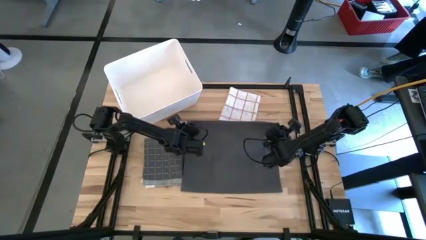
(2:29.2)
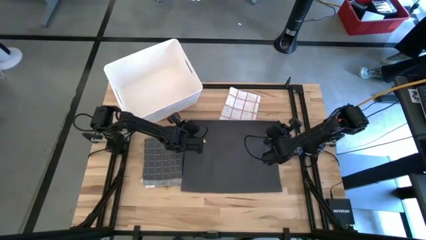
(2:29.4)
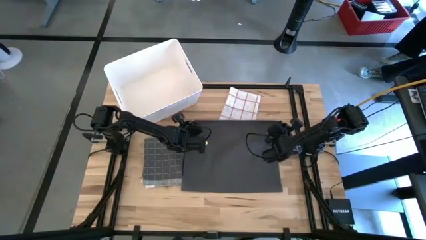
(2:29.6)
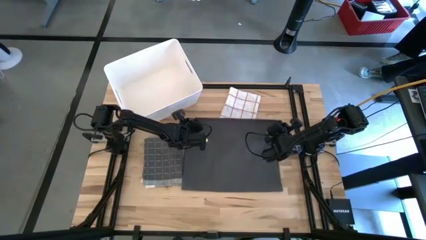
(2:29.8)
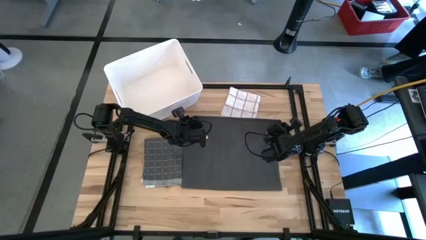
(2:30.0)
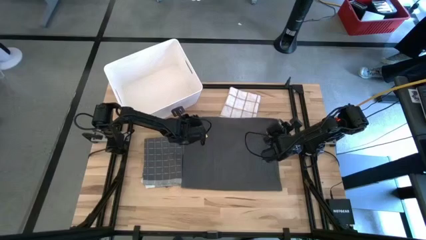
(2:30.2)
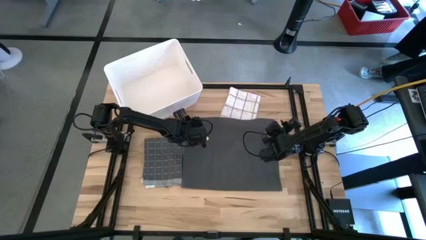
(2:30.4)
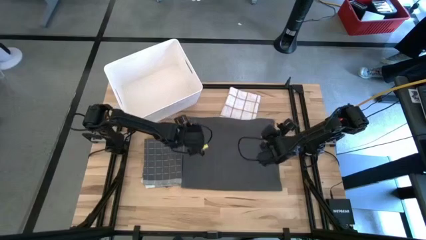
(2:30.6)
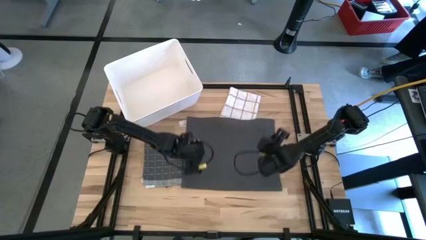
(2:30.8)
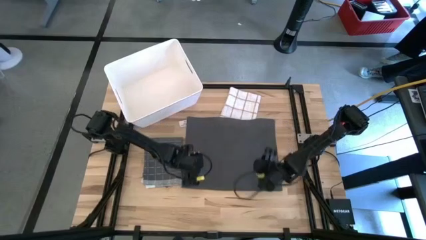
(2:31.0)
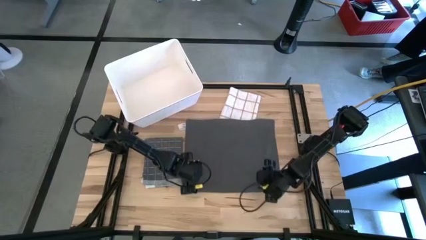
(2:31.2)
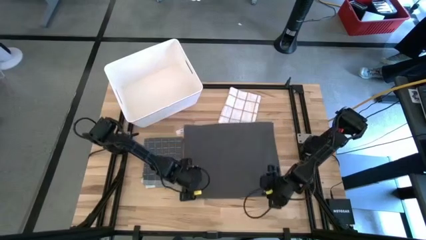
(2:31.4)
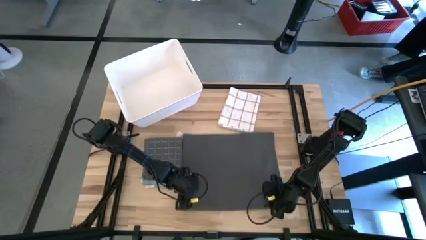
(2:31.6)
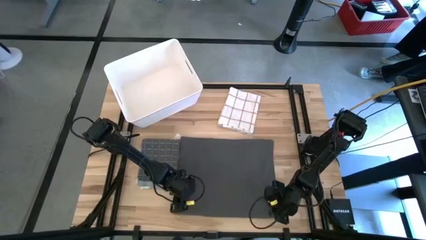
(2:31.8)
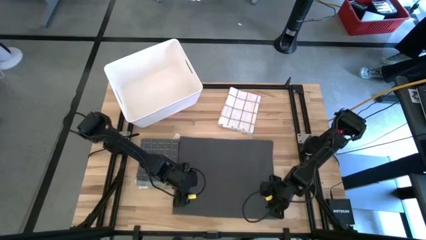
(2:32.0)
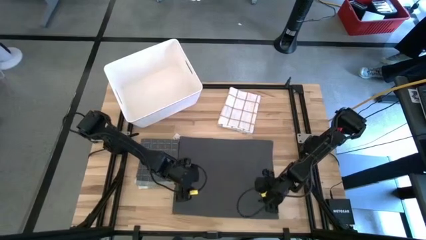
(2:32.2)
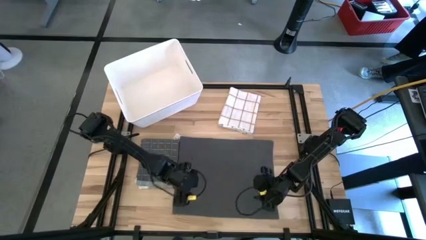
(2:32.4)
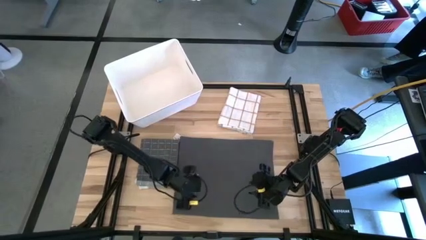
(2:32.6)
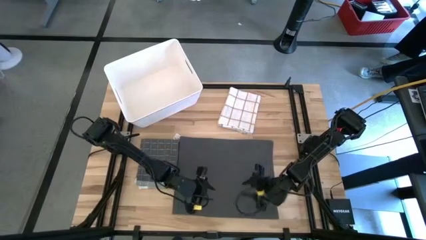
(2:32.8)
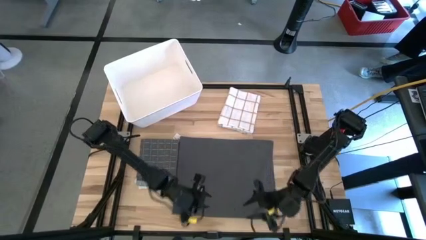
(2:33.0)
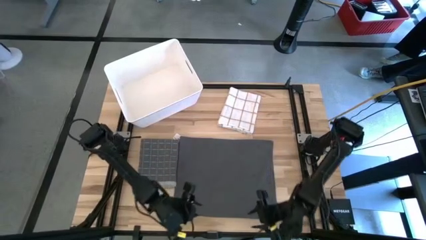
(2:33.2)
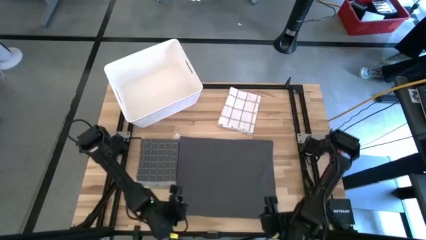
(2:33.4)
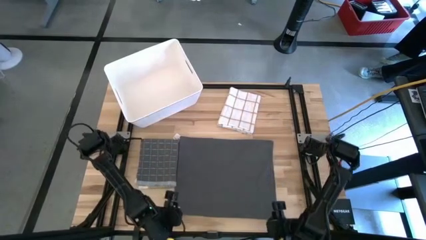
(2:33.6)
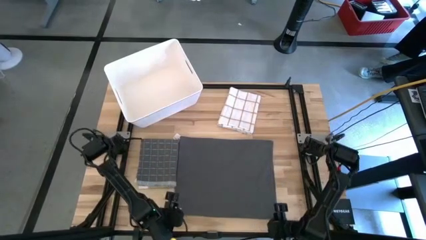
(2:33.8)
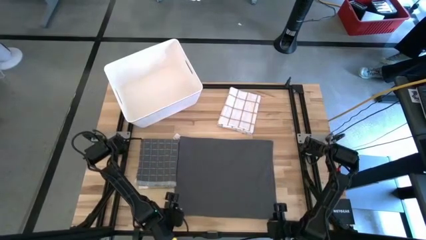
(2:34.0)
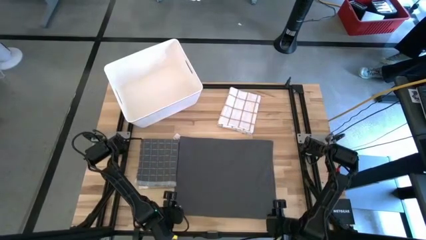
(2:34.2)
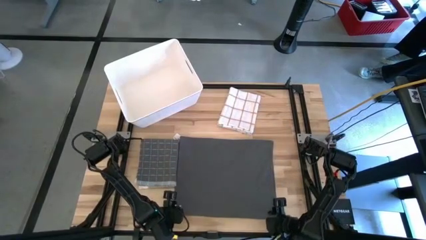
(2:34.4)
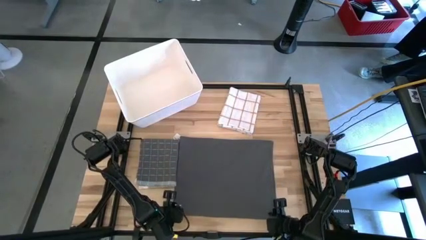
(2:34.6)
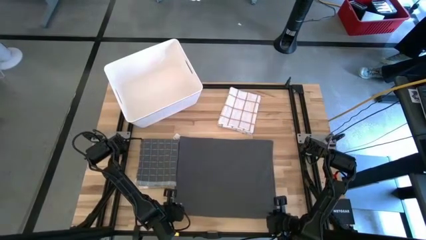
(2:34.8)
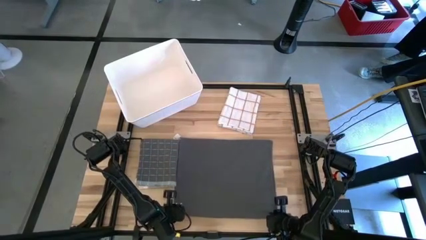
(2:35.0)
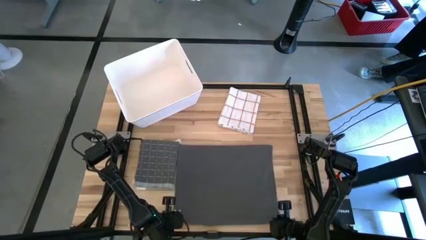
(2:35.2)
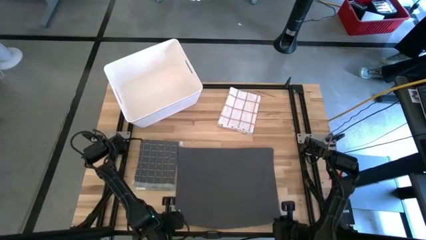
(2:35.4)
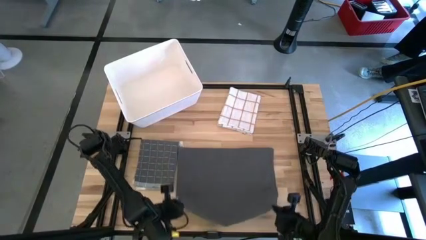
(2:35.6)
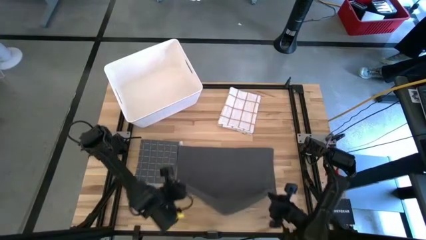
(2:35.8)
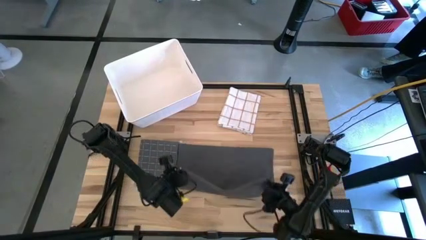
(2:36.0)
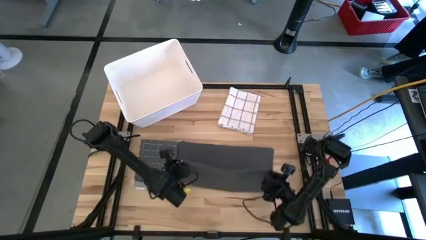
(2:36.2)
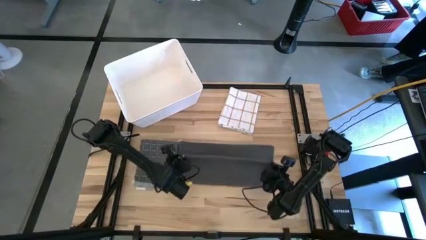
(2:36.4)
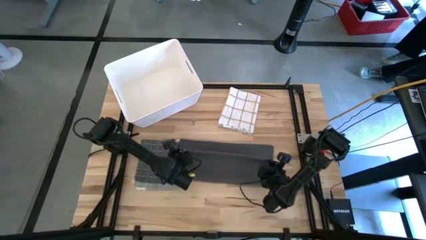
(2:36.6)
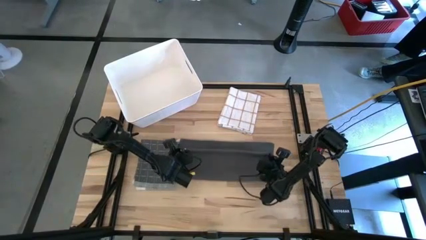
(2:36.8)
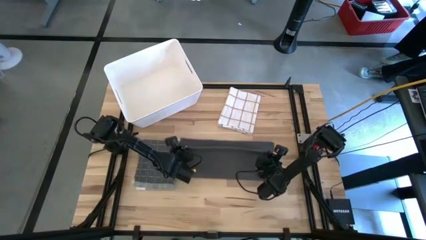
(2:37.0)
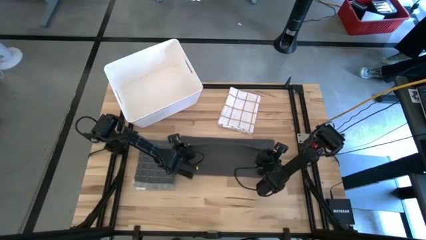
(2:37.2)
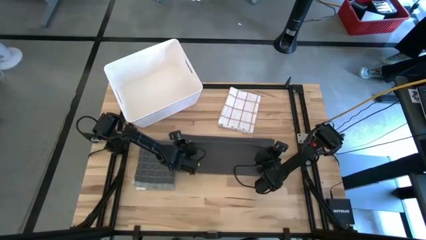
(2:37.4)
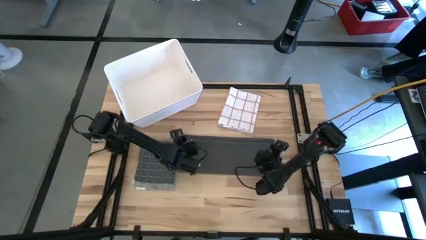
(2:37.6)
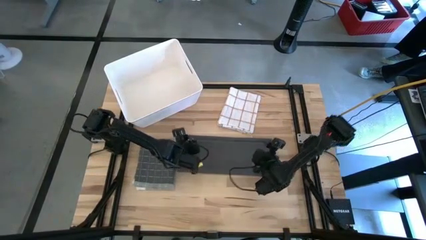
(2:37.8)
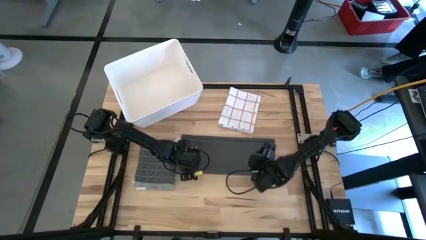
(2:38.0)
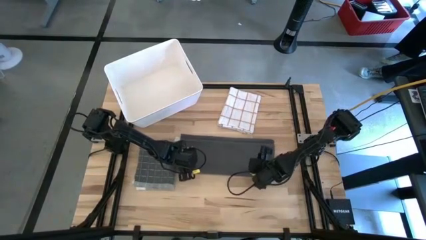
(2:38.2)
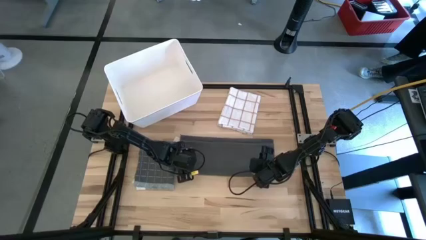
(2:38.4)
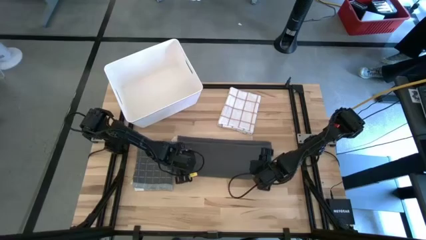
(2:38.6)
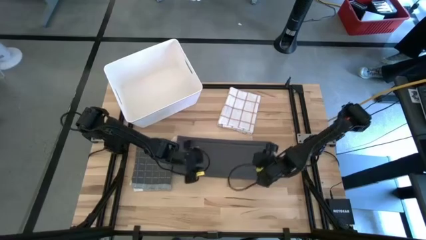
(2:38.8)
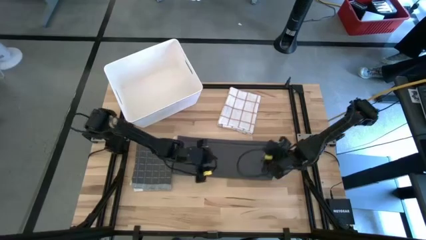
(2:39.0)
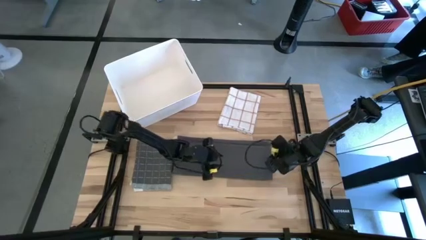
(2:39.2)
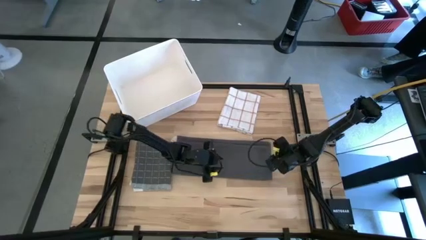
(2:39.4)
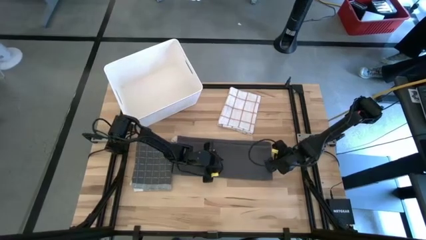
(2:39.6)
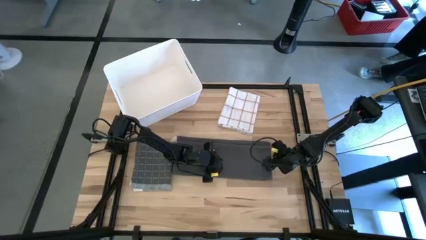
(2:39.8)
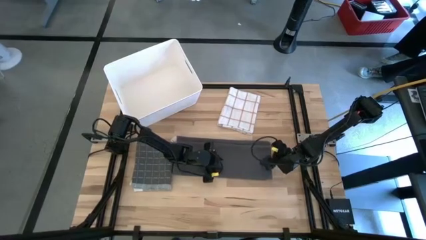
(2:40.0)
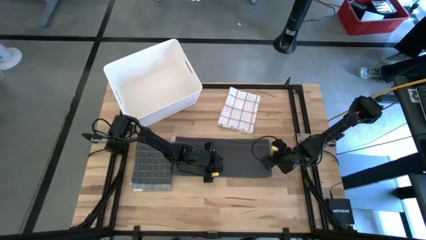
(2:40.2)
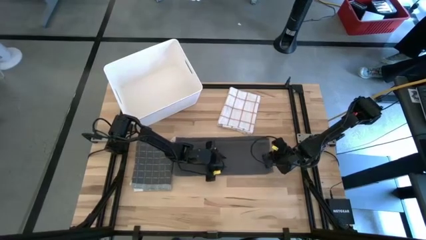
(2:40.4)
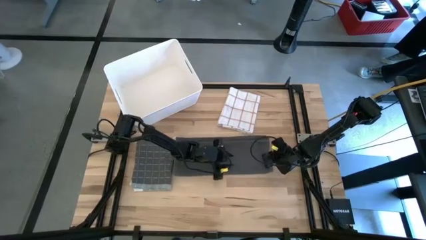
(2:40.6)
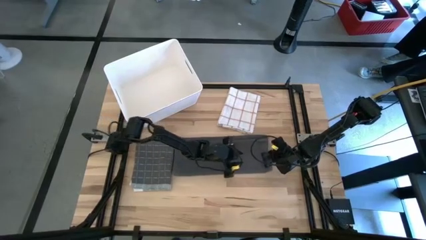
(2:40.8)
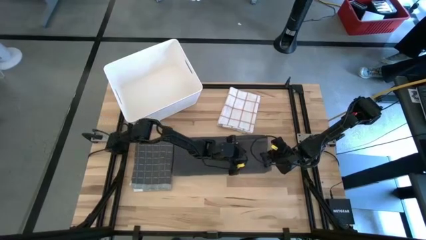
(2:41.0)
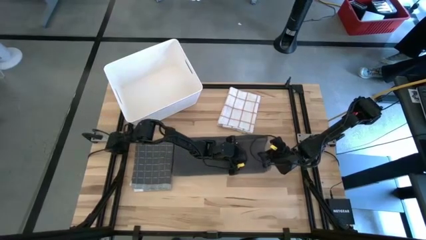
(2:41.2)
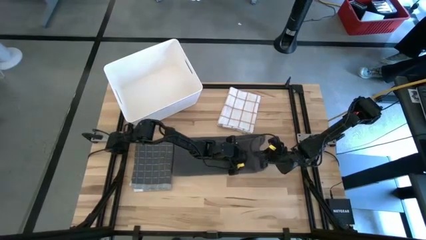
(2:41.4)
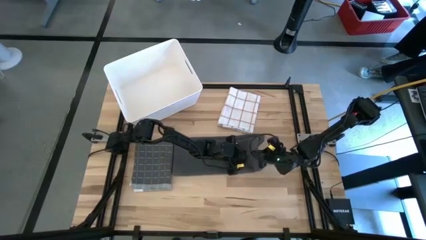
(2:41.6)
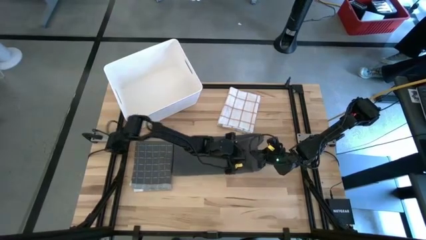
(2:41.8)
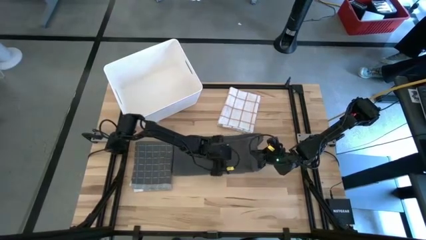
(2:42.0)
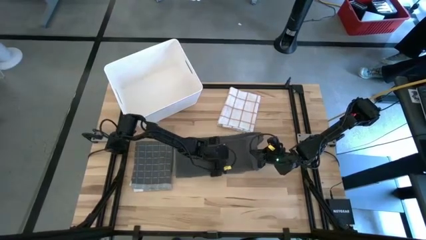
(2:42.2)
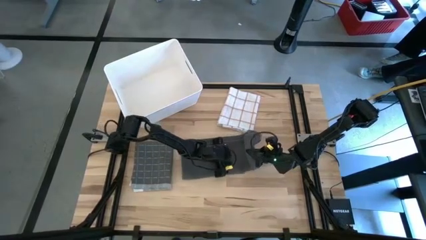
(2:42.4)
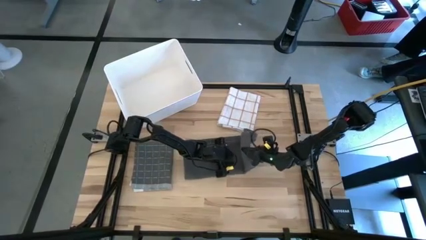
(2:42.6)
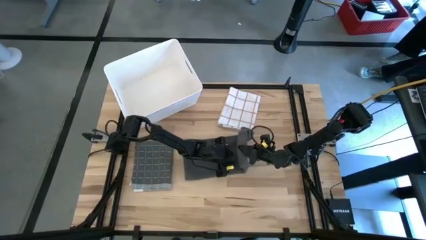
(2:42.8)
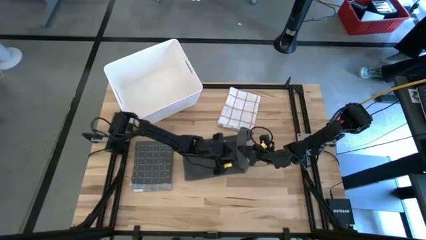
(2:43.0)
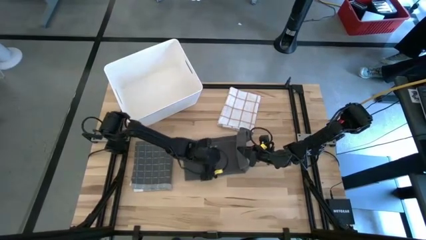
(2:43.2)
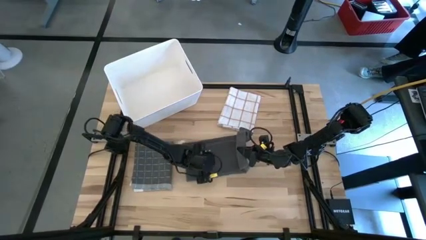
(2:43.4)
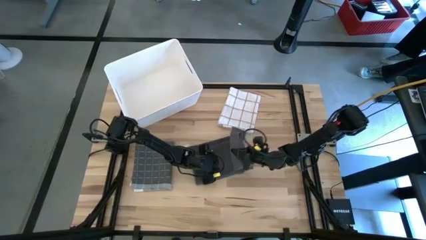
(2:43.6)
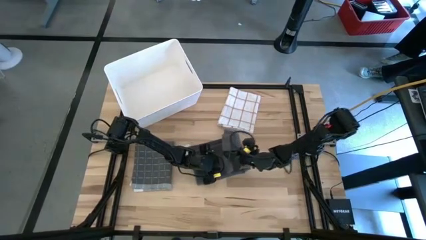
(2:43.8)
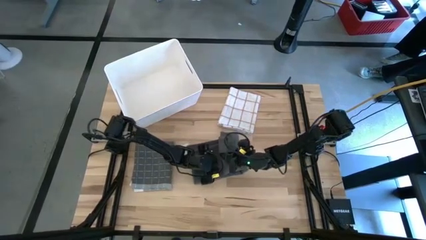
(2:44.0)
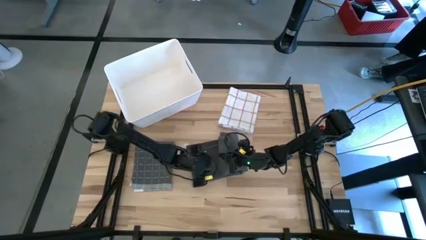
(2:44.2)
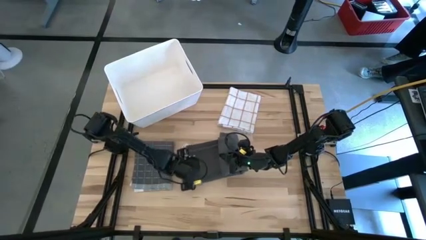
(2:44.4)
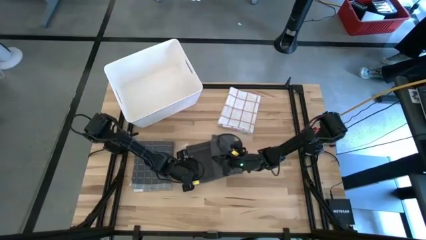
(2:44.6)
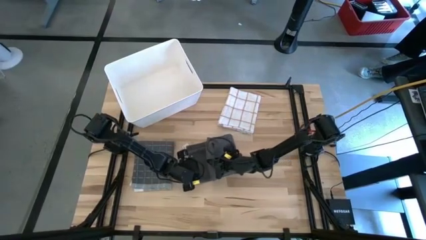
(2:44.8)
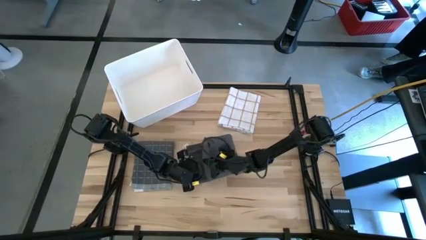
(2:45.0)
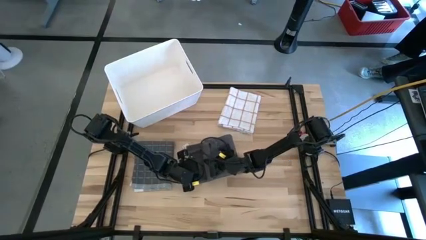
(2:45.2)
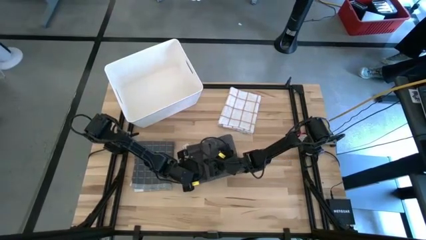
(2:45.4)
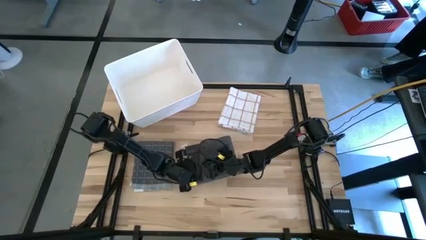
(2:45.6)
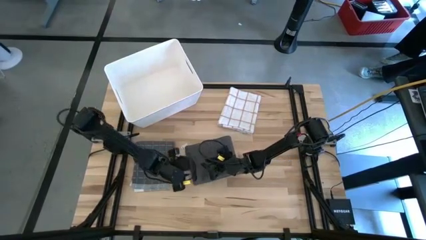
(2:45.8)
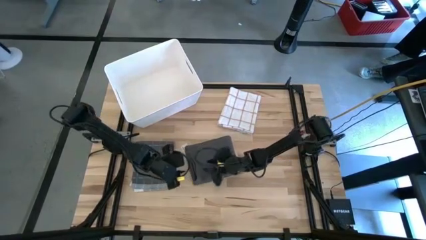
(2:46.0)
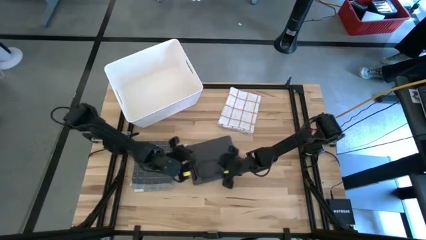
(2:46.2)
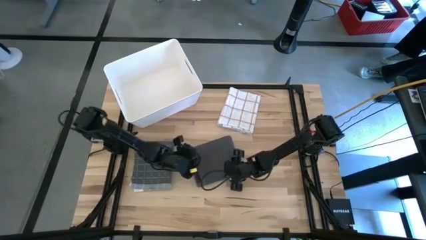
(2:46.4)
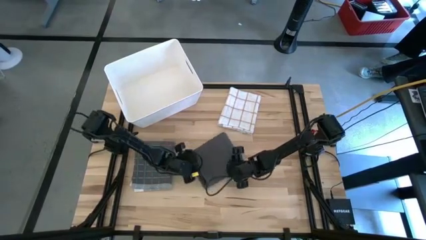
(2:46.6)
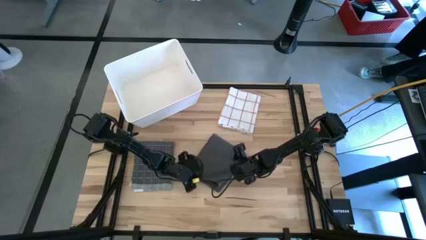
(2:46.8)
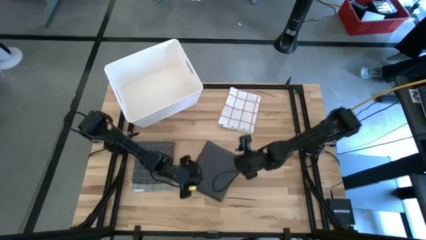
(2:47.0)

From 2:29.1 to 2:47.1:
Task: Fold towel
Fold the gray towel
